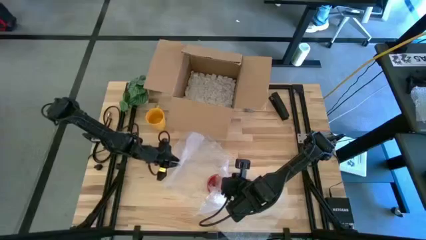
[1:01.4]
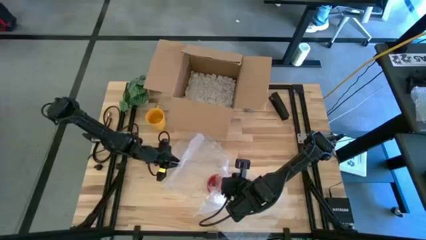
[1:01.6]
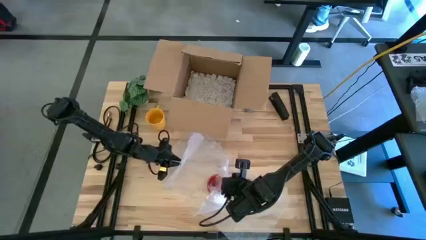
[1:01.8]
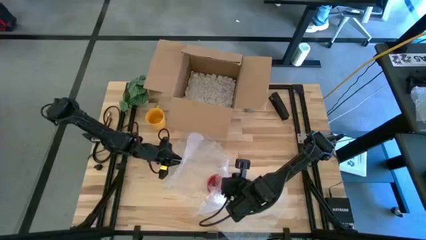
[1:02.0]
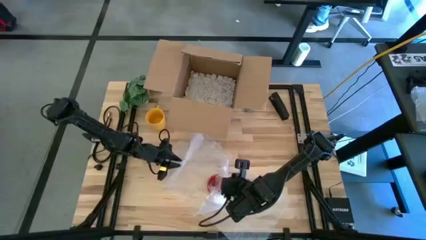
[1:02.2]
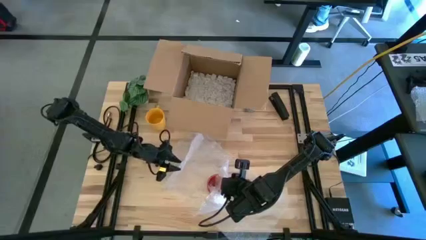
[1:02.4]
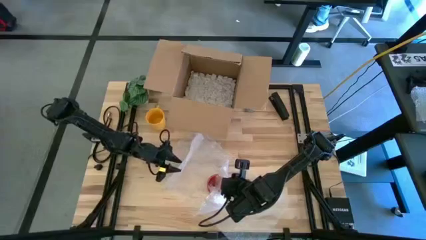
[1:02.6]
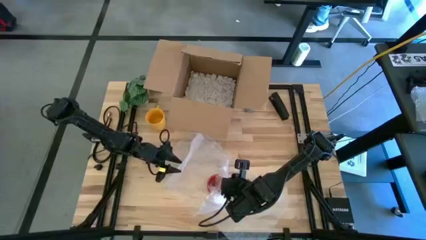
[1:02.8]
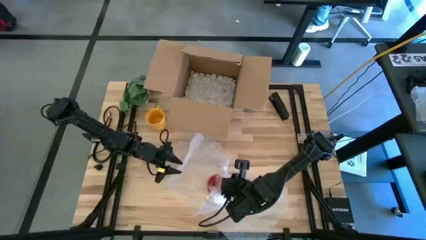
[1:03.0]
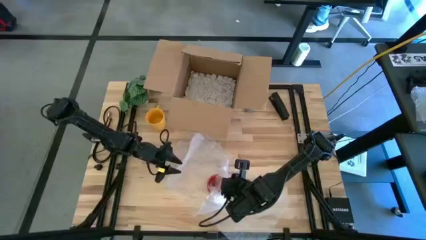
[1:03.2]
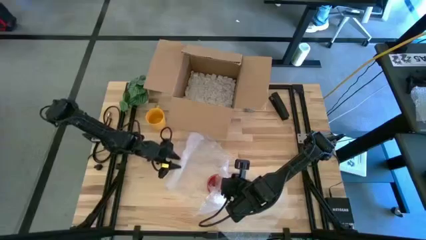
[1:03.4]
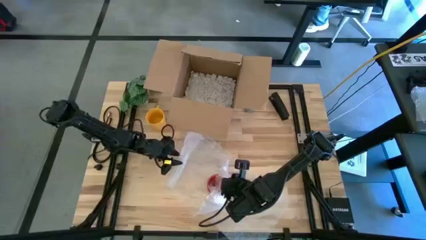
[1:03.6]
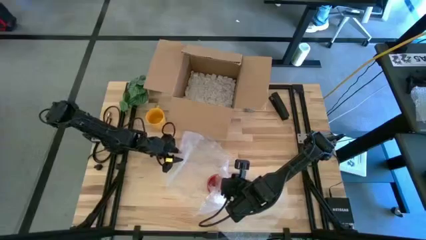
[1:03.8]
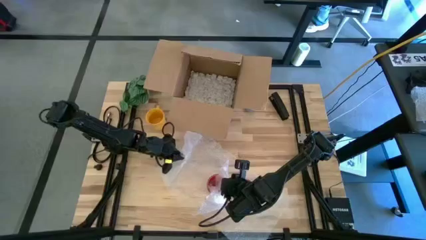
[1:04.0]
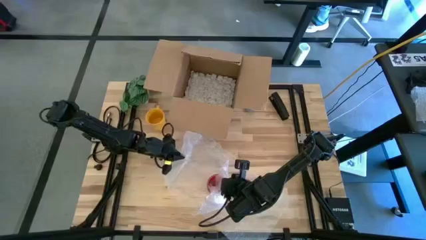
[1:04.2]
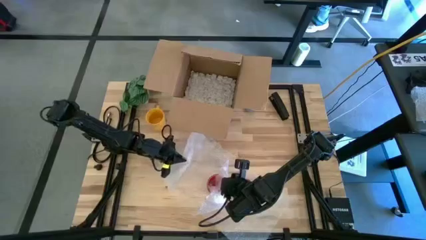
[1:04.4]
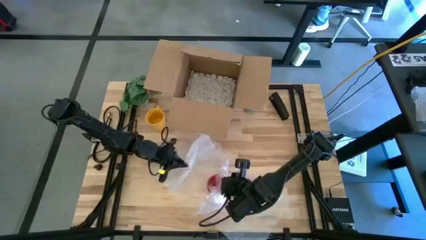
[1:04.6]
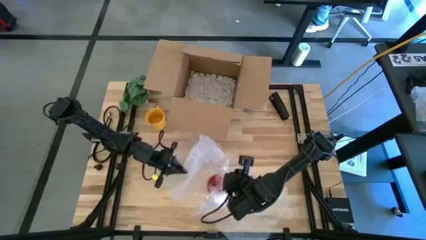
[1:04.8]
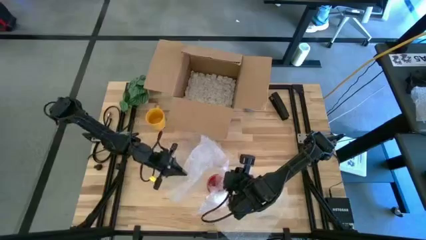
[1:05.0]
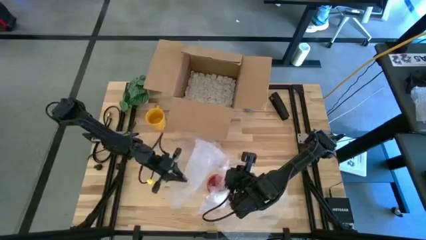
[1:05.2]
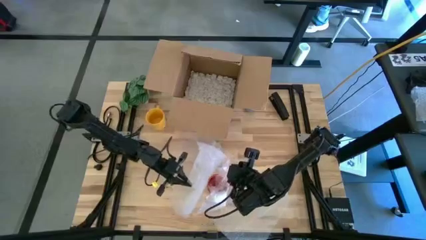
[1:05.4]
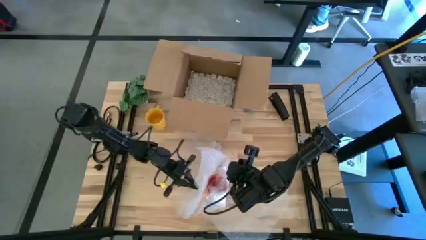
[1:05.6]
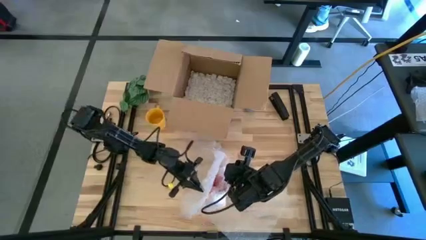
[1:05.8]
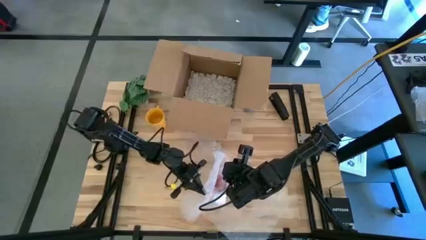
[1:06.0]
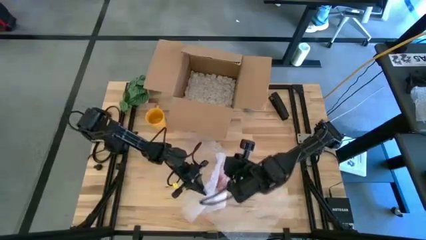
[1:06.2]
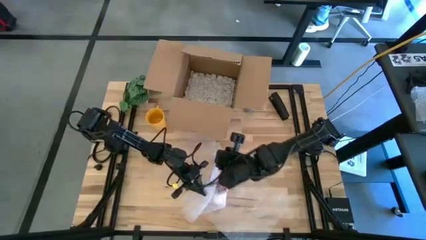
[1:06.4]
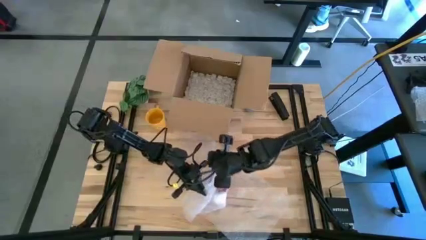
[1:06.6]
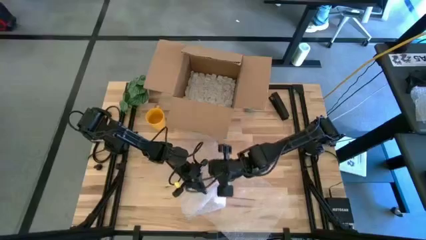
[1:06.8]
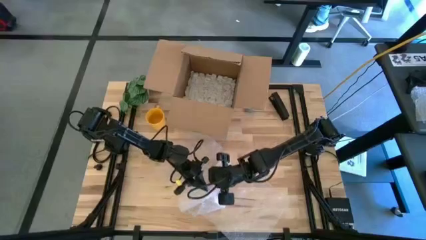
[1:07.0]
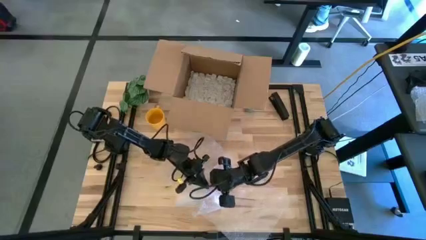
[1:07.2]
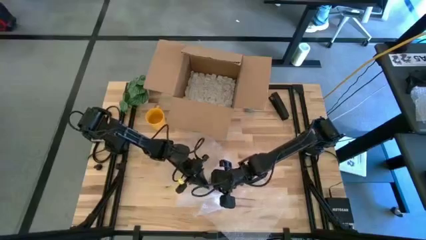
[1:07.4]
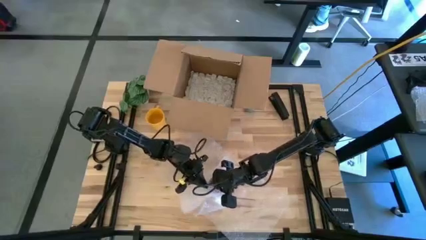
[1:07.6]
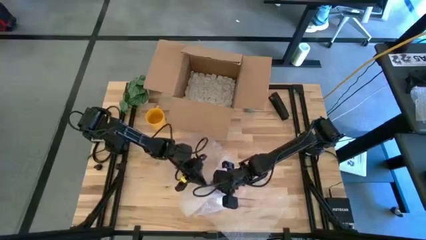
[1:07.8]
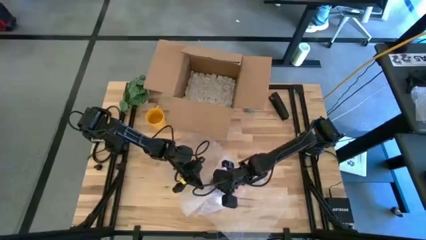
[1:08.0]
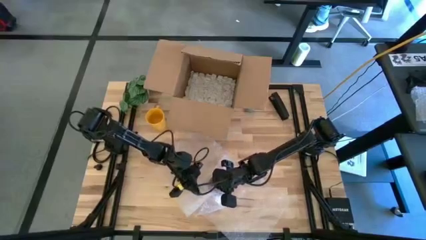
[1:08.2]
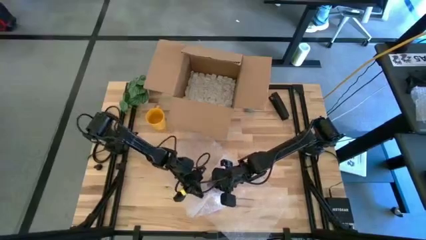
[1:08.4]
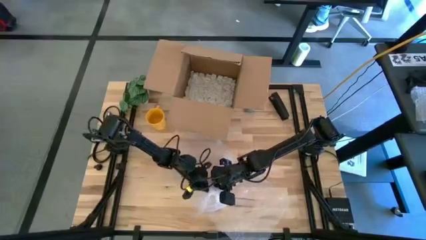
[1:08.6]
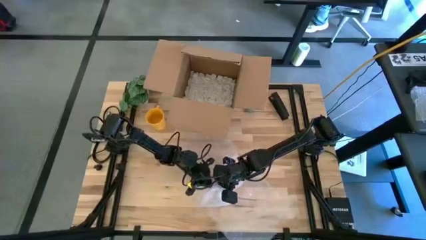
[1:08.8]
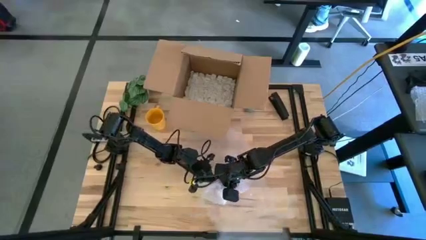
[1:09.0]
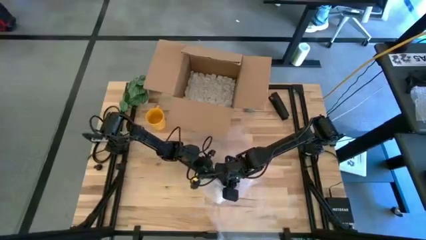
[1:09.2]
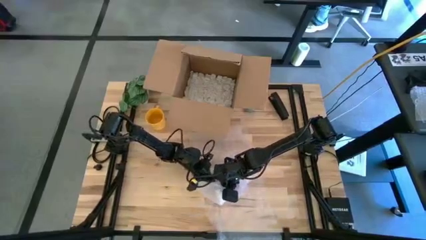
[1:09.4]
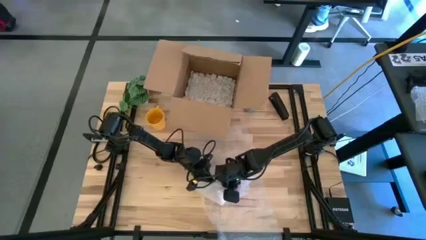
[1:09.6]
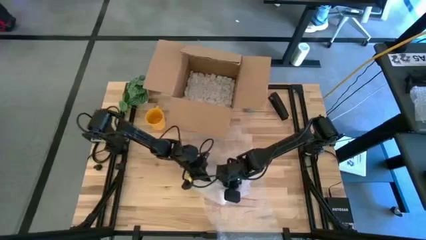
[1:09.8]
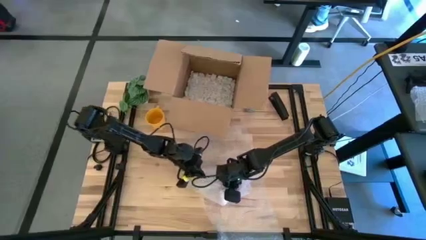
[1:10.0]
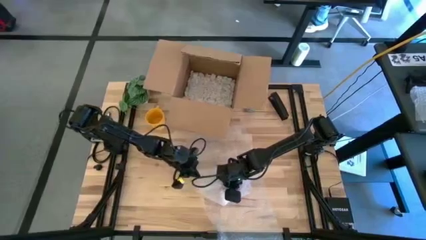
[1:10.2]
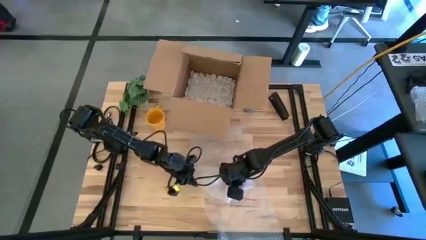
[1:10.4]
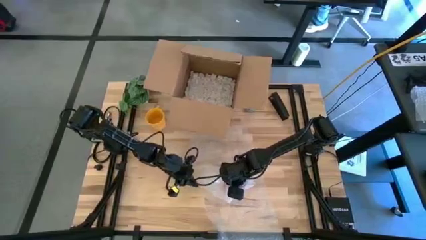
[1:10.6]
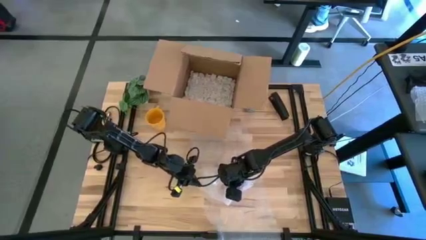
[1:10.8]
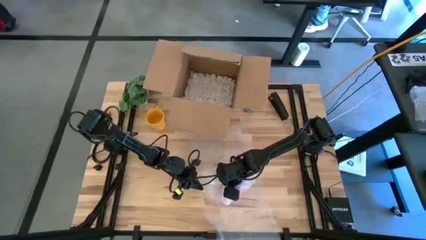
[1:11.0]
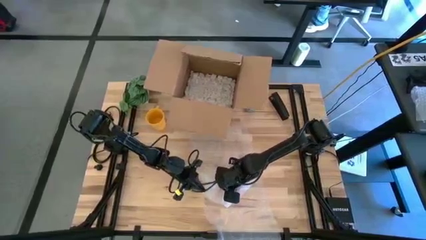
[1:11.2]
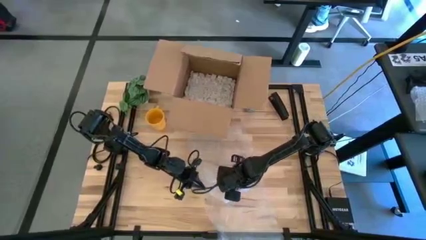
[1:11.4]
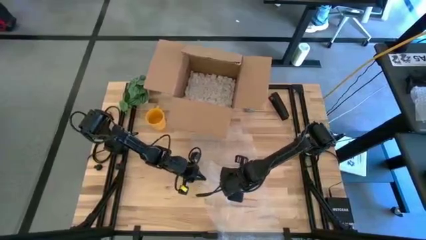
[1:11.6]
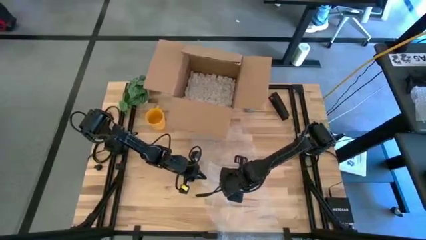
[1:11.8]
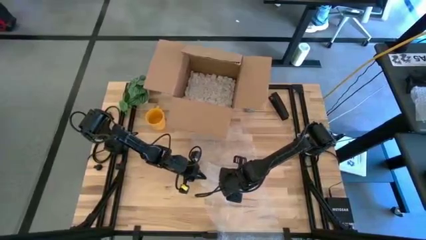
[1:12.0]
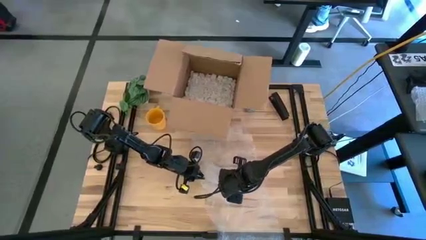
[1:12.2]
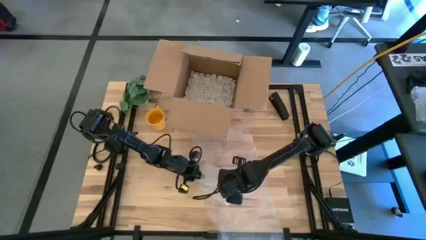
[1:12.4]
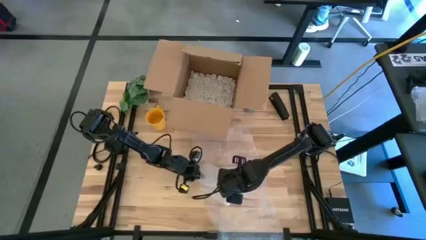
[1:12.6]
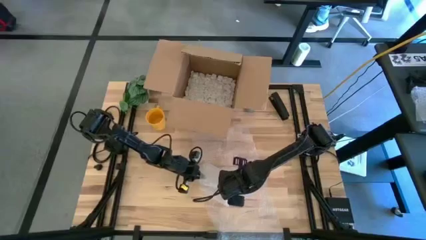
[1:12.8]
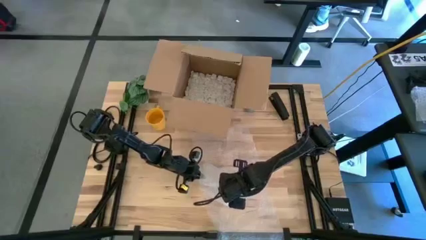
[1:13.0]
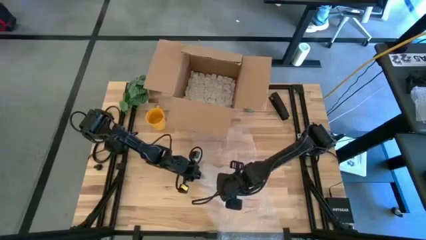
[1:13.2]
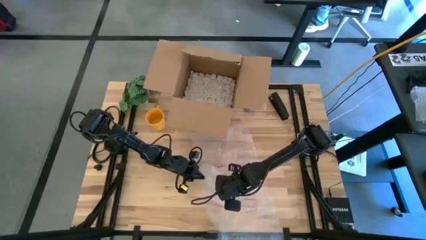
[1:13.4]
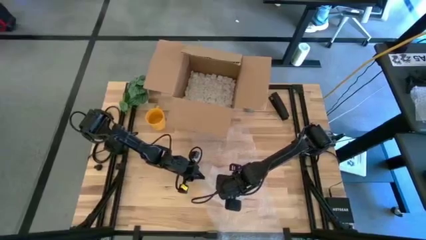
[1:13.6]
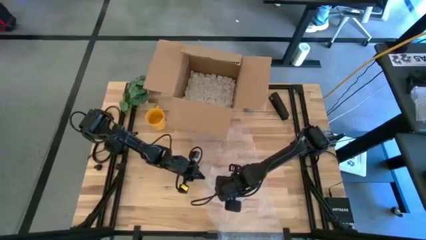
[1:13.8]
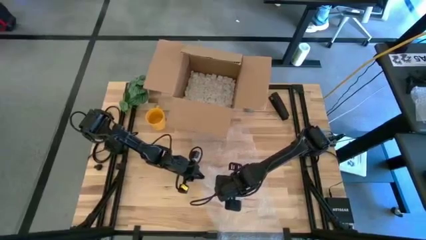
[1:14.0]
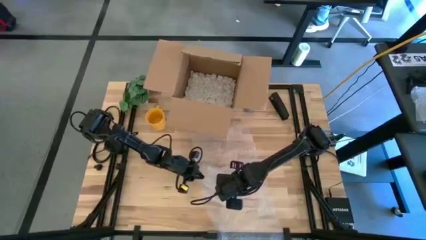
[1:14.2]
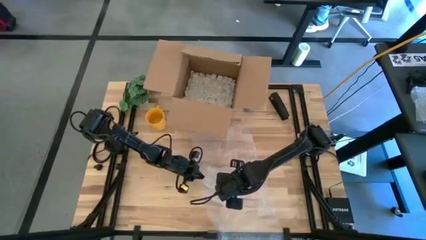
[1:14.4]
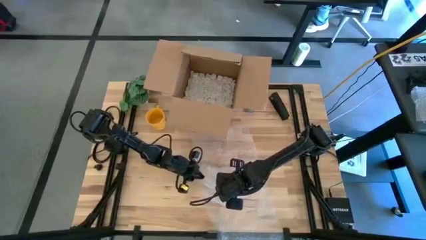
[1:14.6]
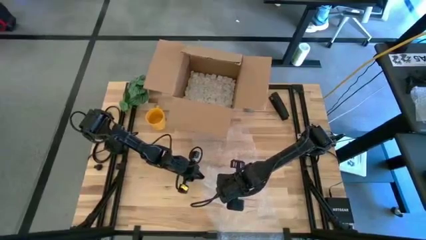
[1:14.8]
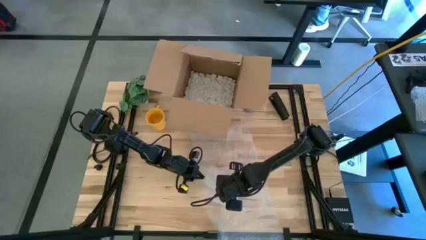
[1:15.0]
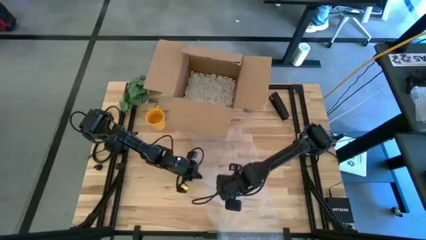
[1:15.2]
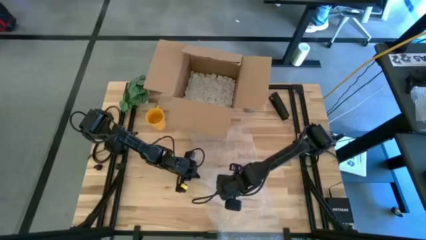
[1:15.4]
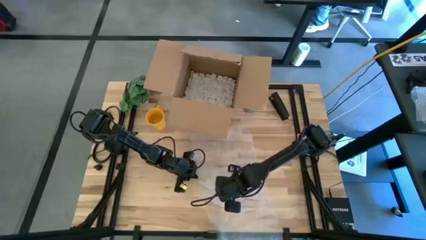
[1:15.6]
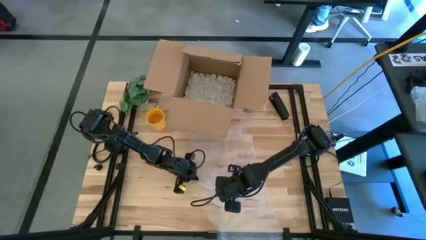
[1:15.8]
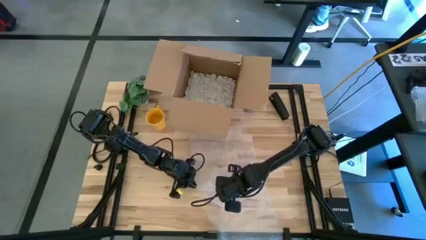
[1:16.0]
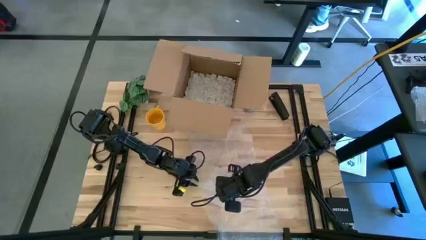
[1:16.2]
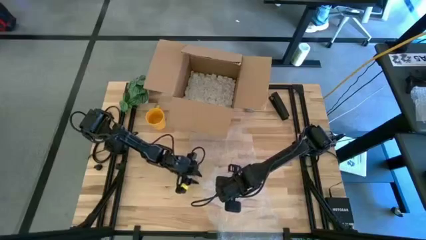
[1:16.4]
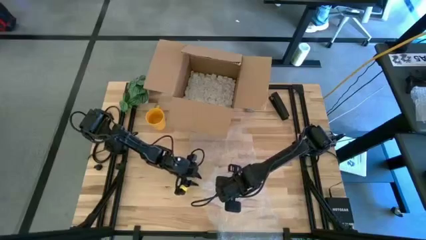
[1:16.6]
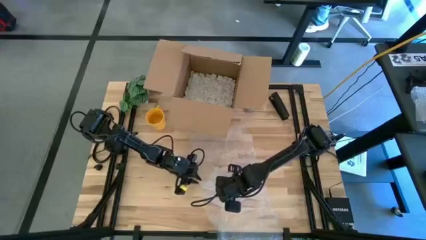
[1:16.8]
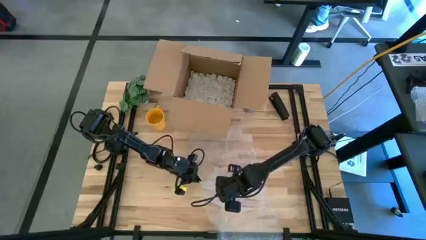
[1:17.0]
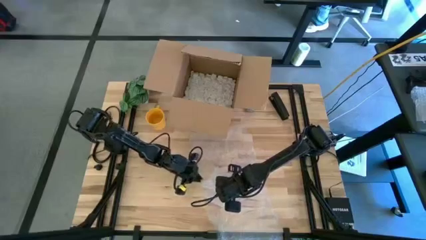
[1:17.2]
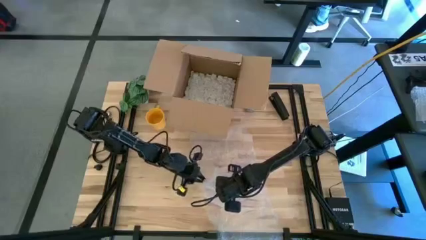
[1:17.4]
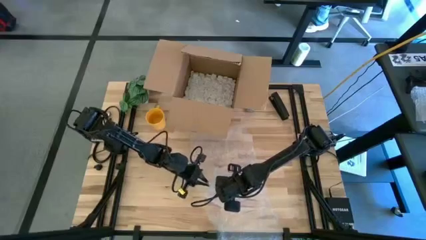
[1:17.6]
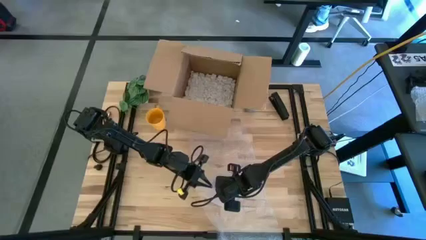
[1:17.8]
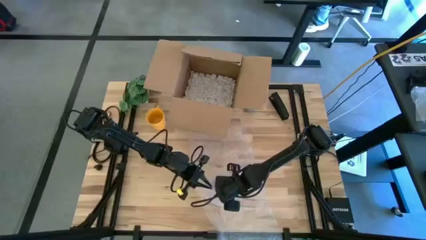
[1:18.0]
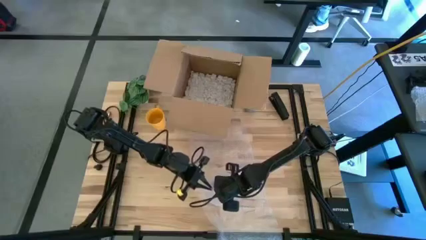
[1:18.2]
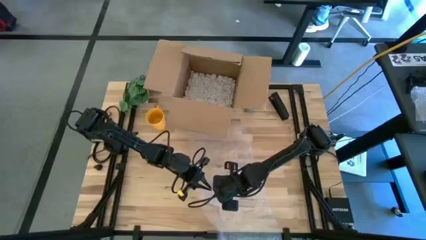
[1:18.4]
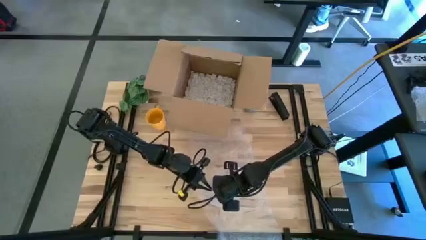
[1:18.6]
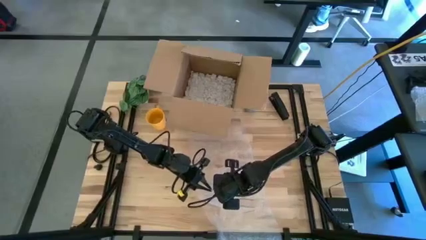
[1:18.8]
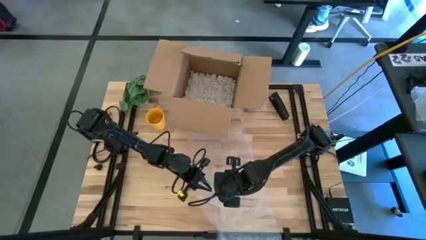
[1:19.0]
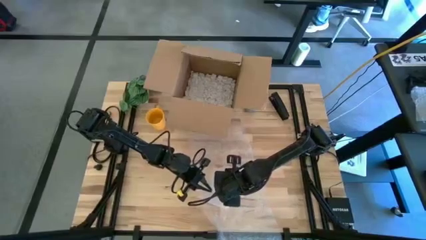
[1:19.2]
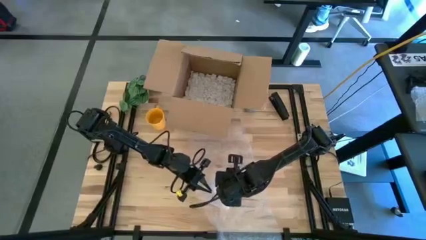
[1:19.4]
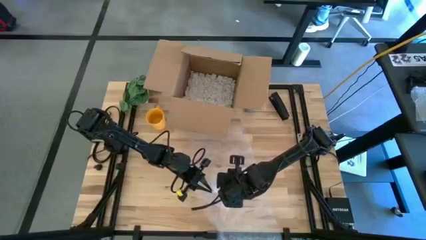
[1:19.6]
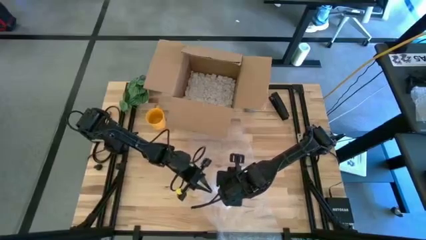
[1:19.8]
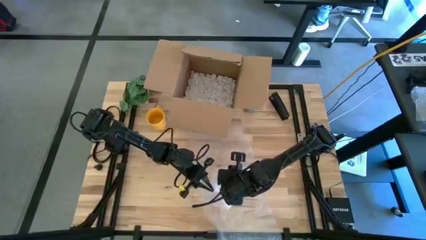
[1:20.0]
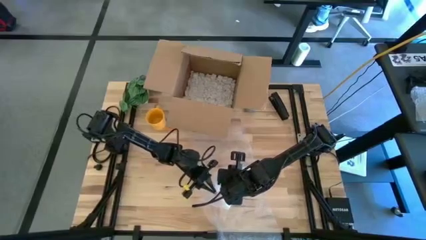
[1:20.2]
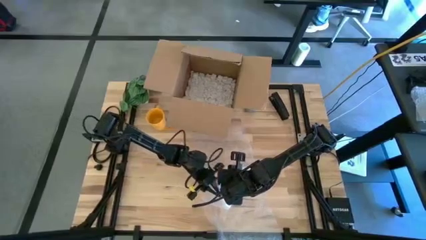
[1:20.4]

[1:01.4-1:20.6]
Task: wrap mug
Wrap the red mug with the bubble wrap
